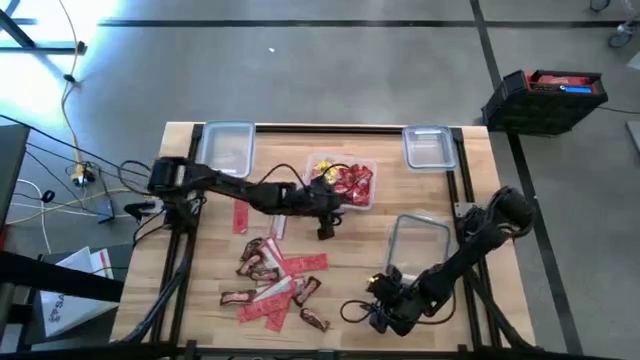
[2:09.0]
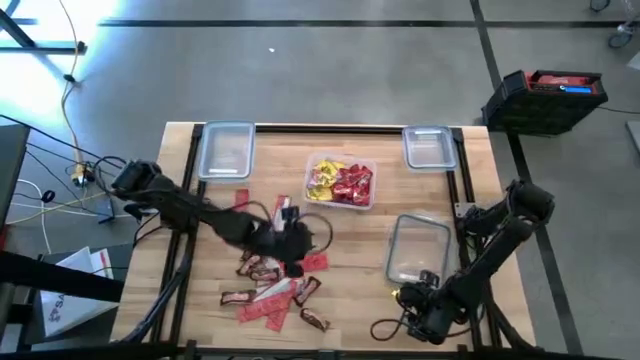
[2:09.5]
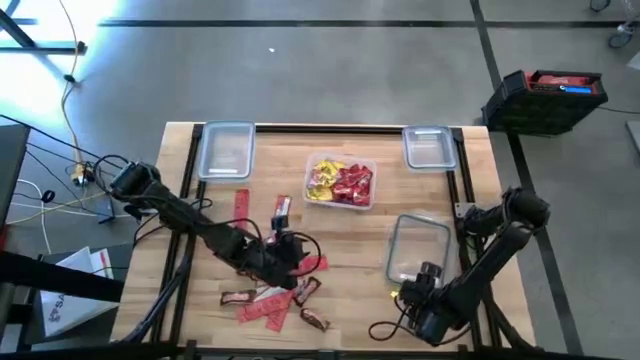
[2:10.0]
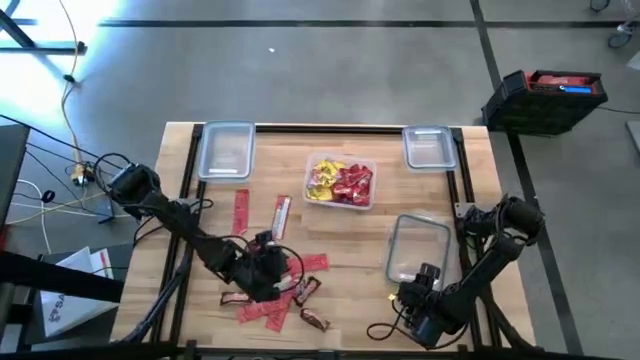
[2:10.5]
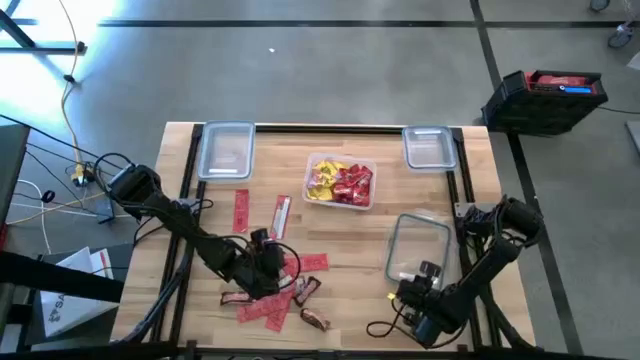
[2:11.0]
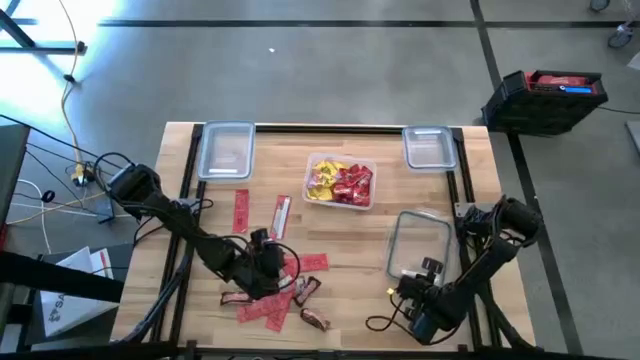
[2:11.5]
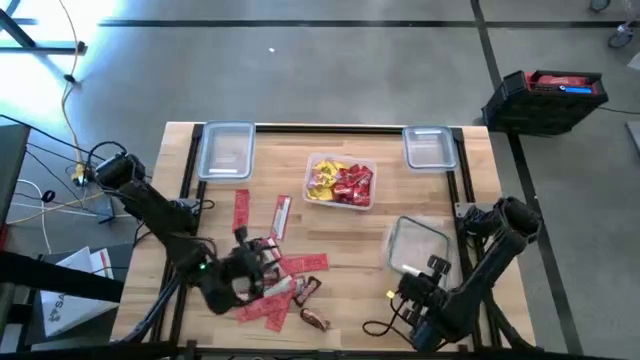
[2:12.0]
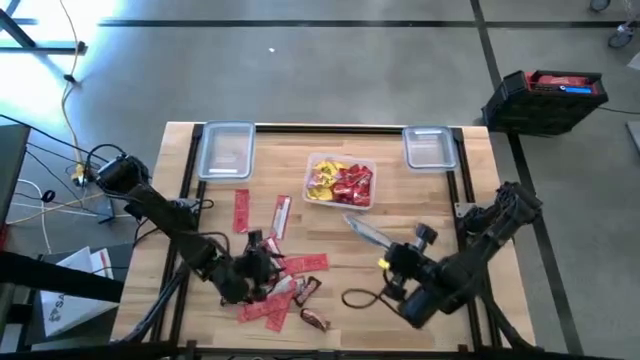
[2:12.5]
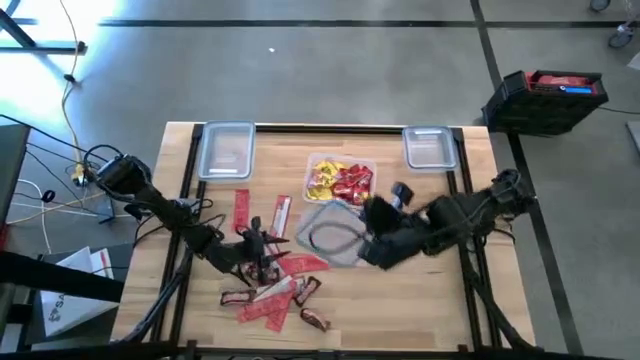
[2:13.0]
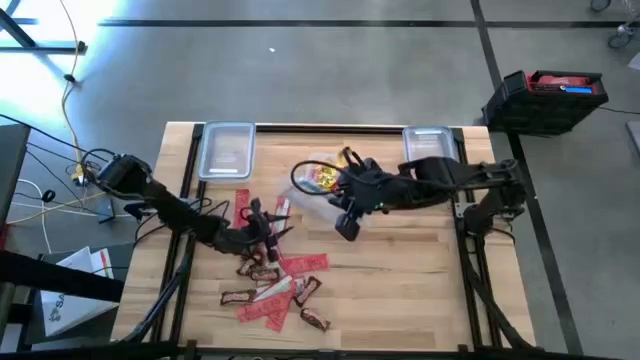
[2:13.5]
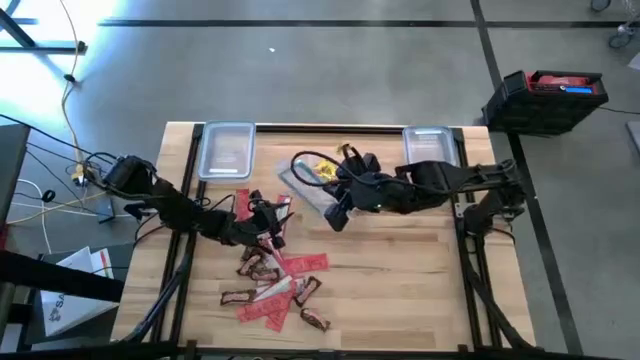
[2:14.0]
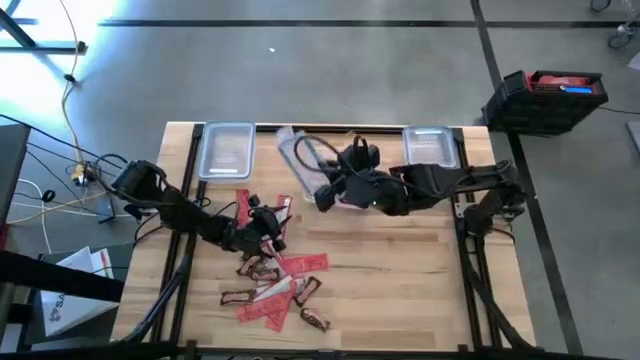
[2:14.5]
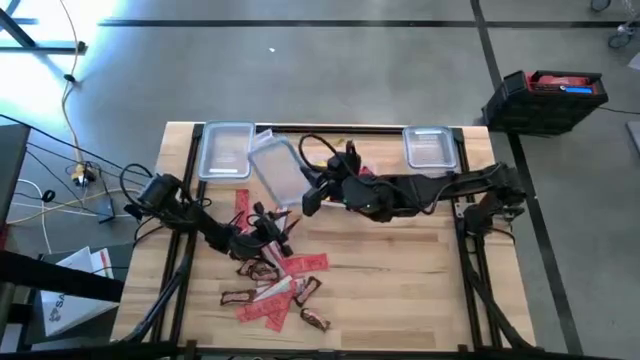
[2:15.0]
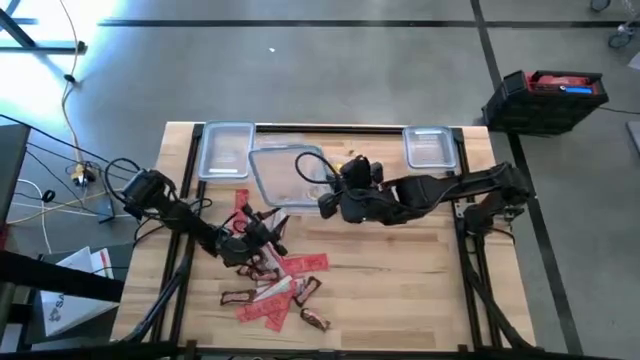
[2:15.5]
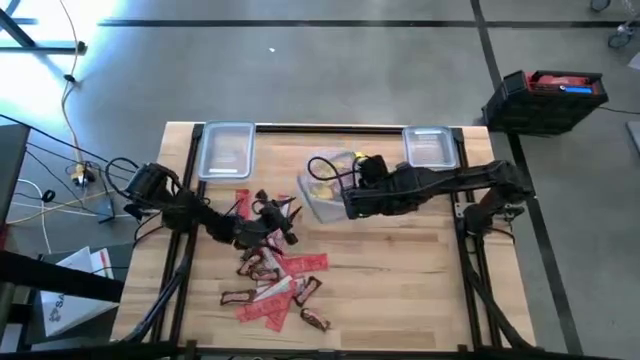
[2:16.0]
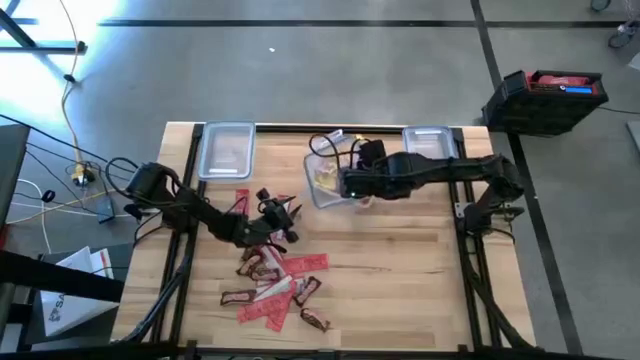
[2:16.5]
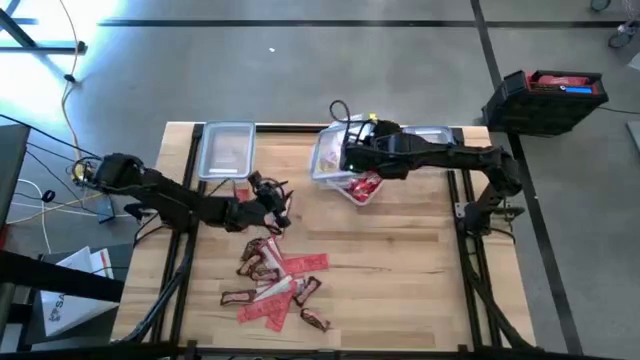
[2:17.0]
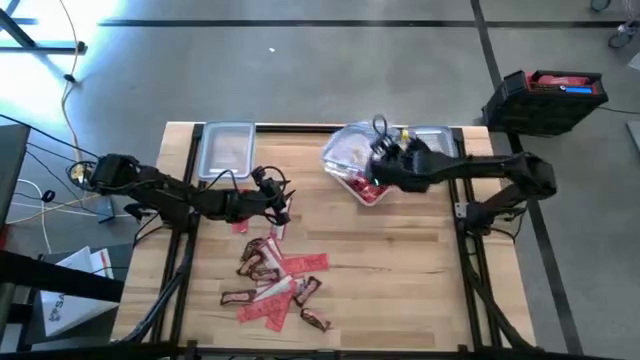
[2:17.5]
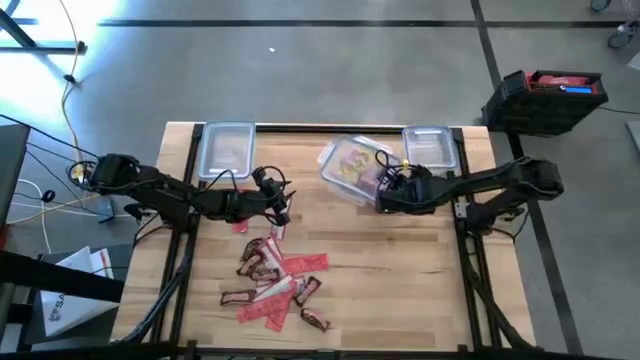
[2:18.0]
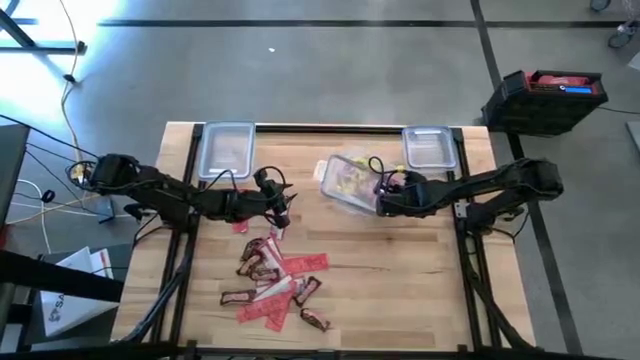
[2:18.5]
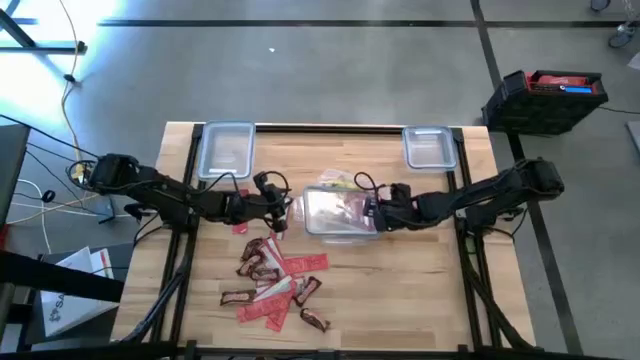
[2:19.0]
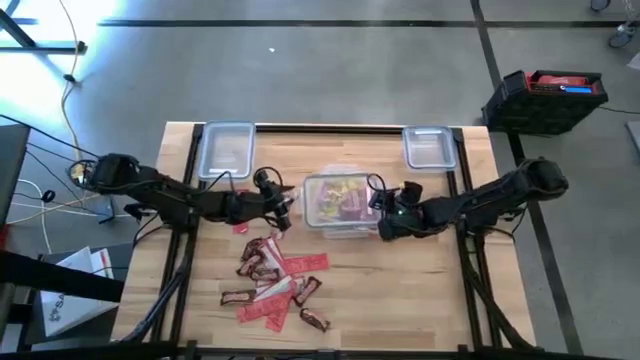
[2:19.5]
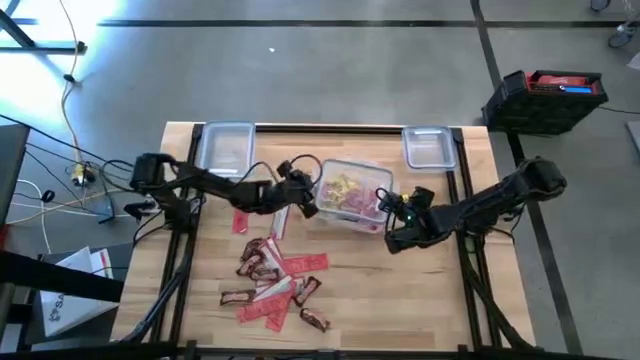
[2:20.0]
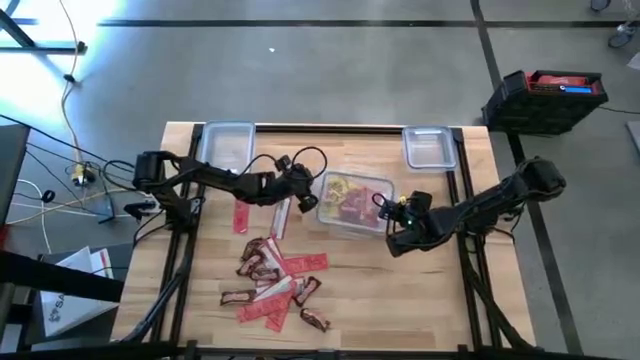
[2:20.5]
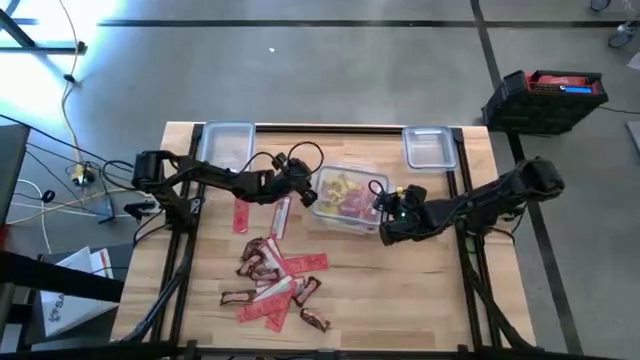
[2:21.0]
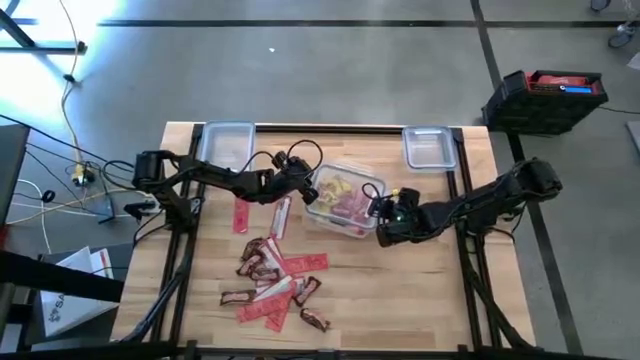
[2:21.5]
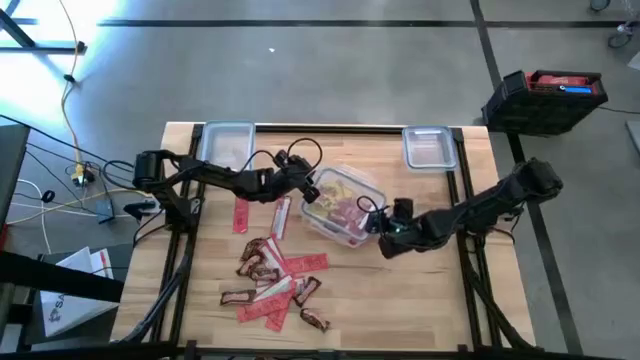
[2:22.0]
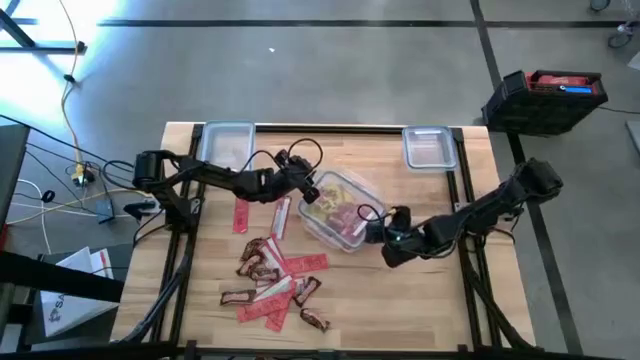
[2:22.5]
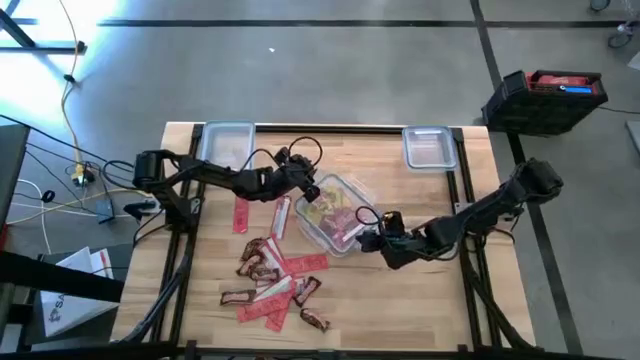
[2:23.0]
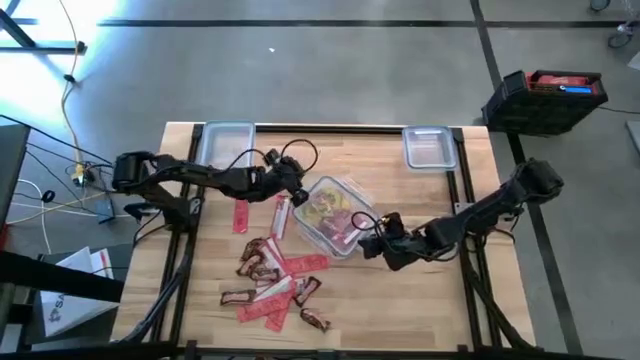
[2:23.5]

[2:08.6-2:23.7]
Task: Sort candy
Close the transparent bin

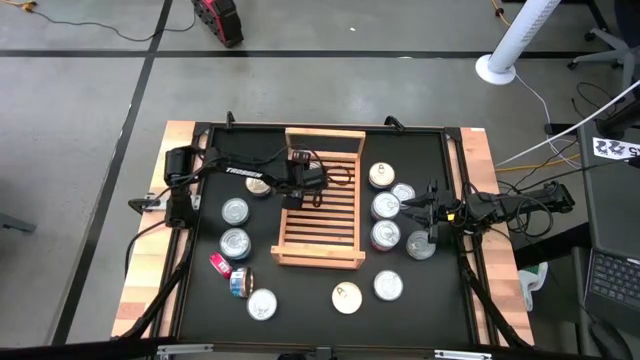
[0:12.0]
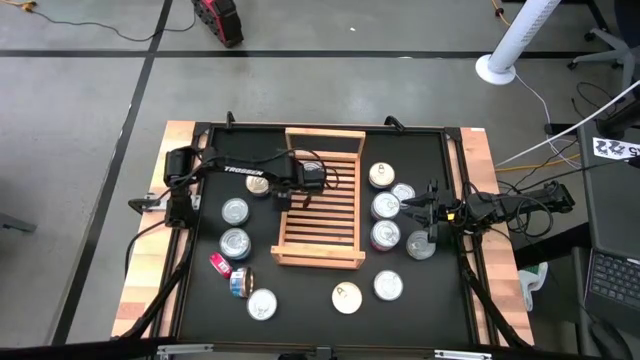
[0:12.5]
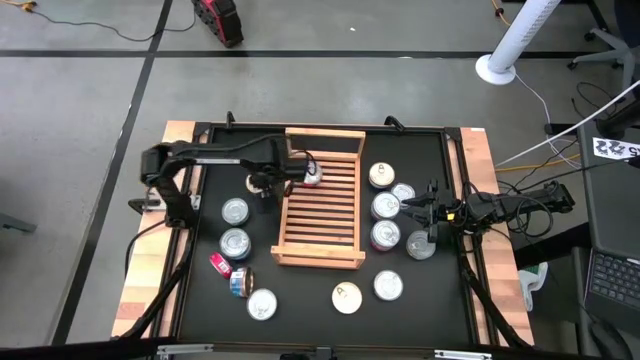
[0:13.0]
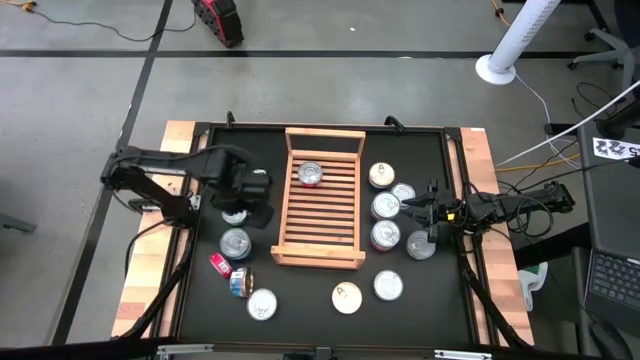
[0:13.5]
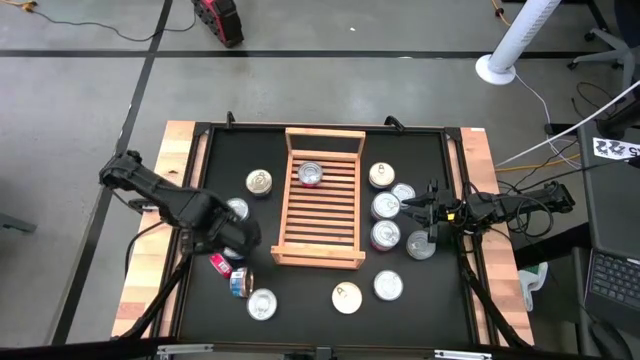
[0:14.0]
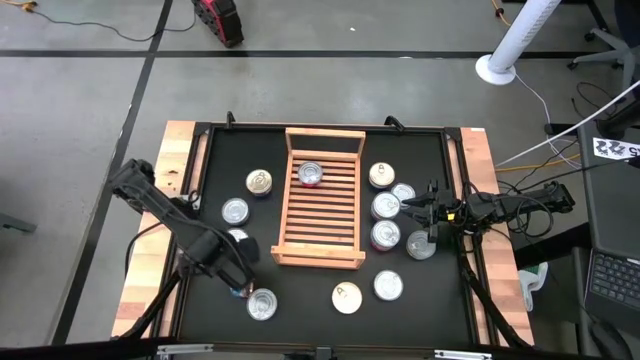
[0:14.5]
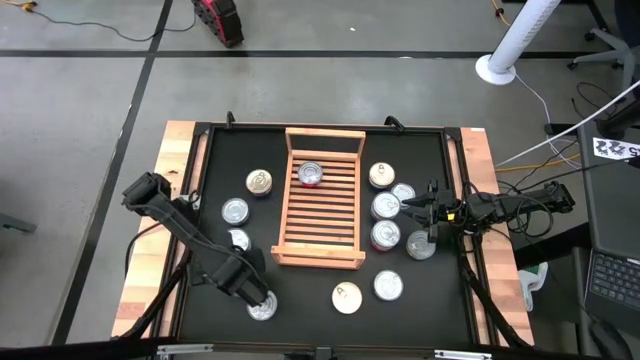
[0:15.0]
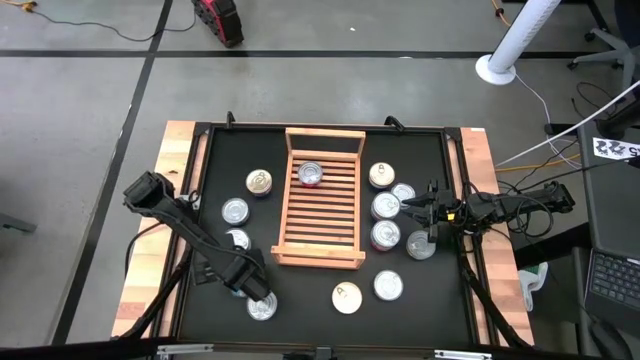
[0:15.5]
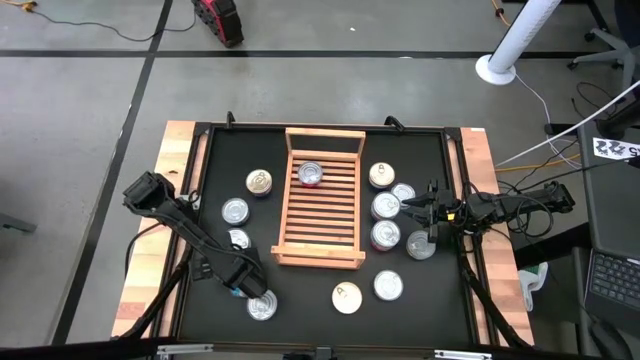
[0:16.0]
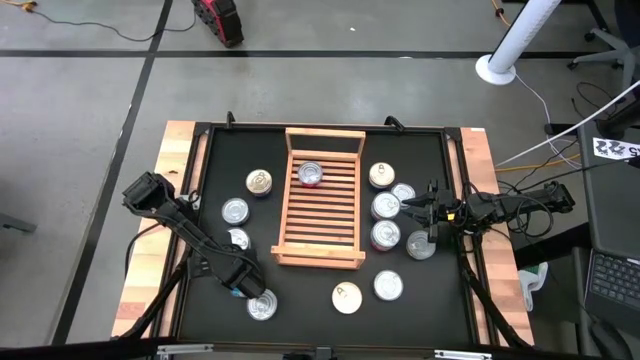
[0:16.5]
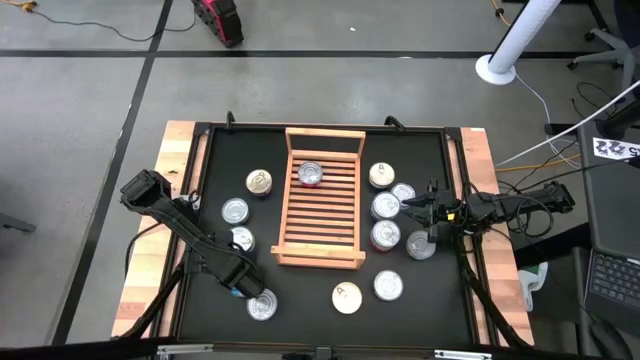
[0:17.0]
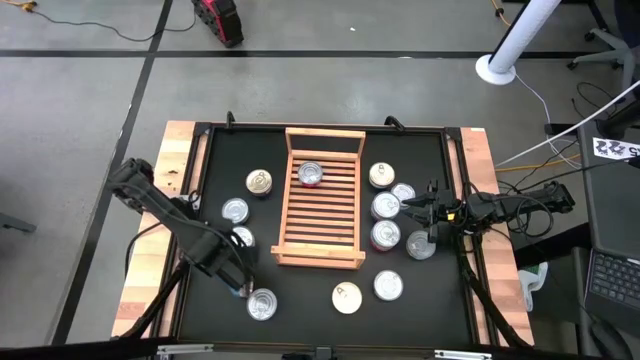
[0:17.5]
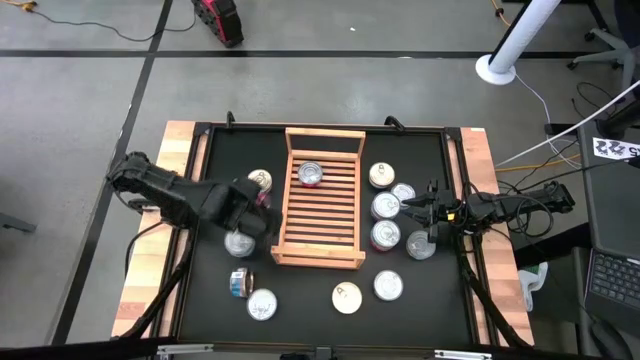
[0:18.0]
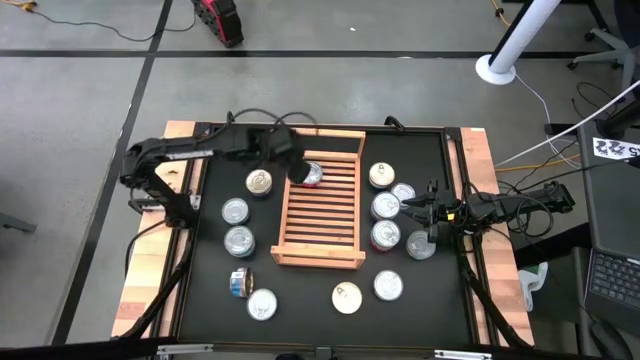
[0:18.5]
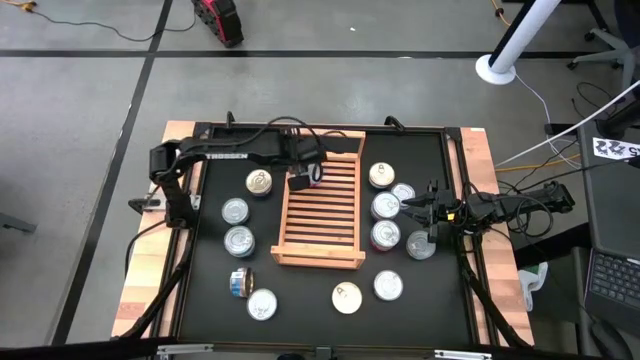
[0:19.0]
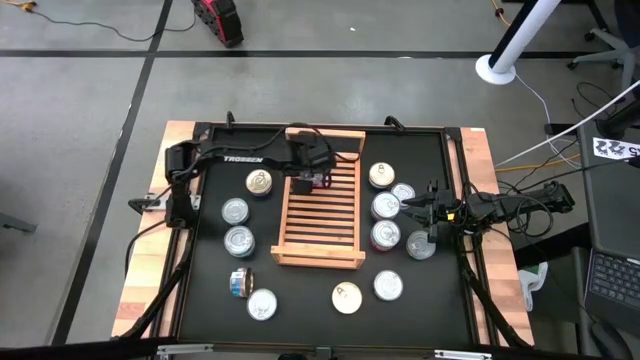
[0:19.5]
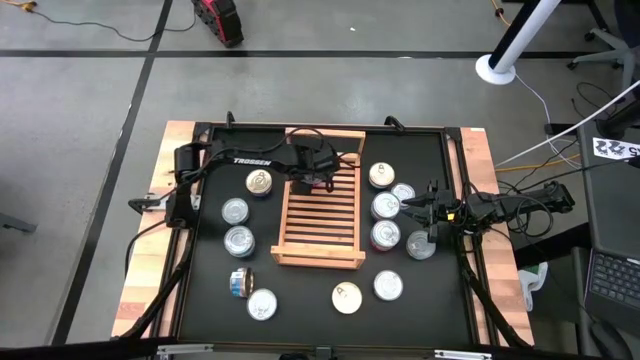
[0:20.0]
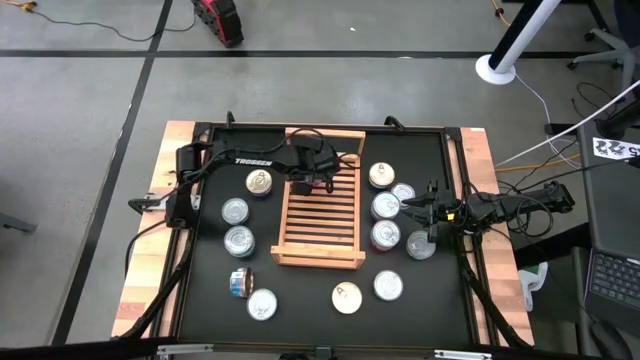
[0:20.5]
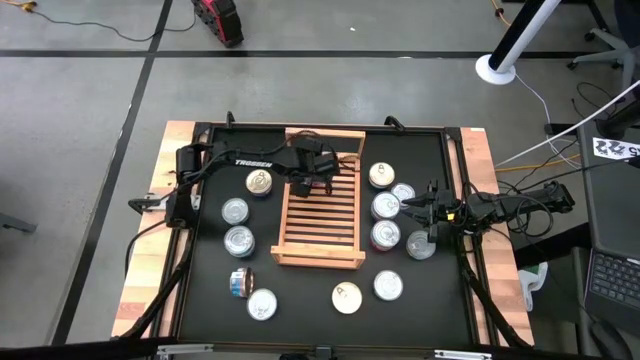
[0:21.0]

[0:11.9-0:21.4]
Task: Stack canned seafood by type on shelf
Stack the red tuna can on top of the other red tuna can on the shelf
